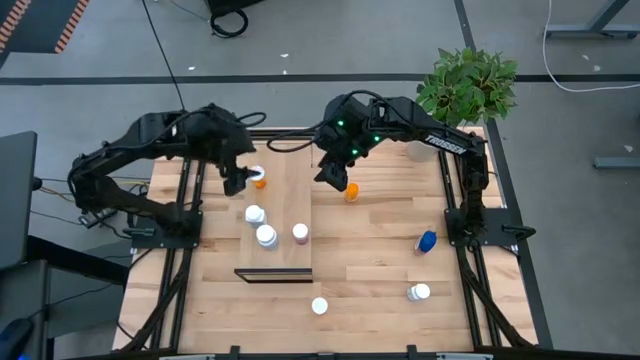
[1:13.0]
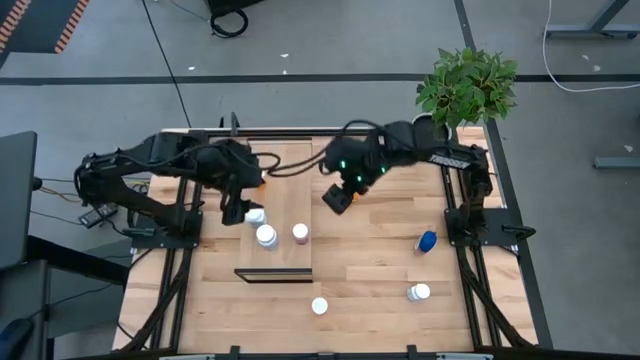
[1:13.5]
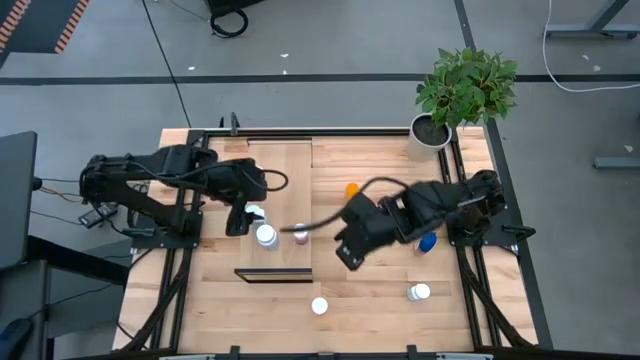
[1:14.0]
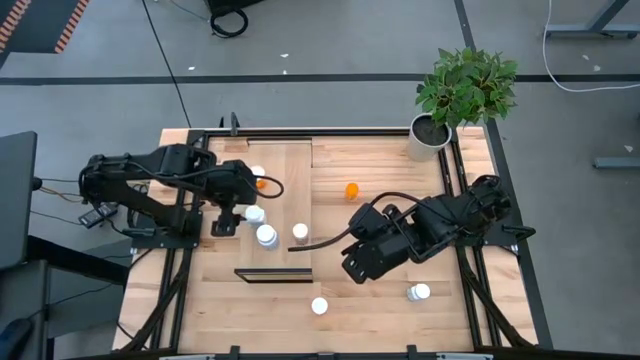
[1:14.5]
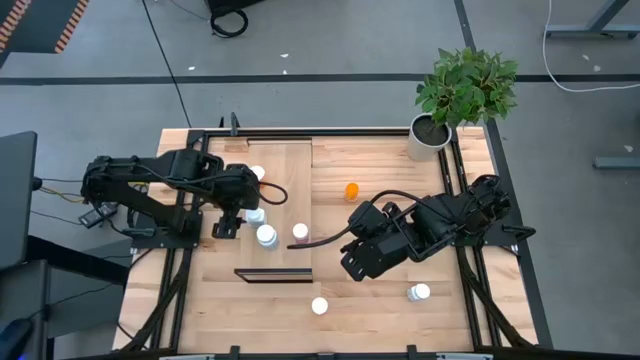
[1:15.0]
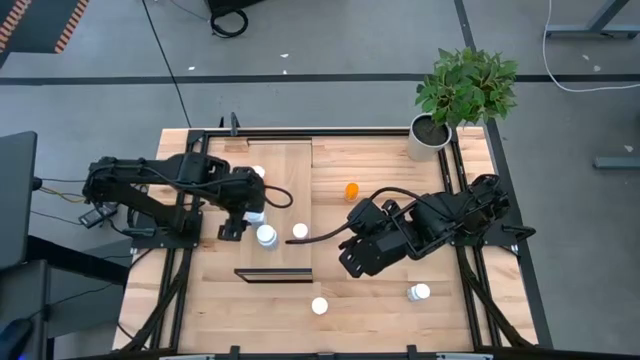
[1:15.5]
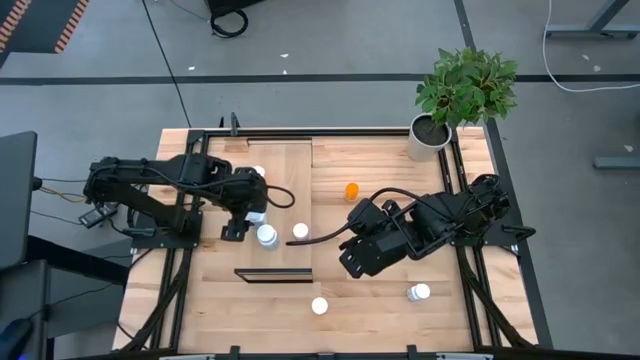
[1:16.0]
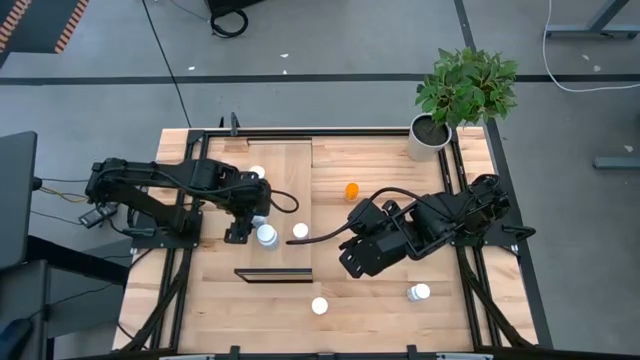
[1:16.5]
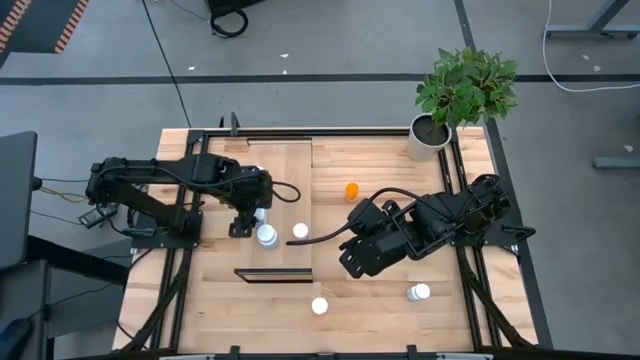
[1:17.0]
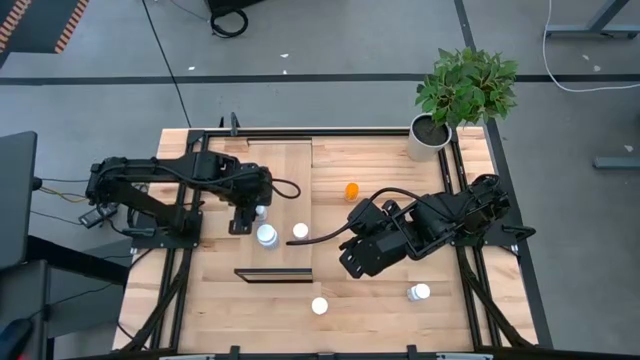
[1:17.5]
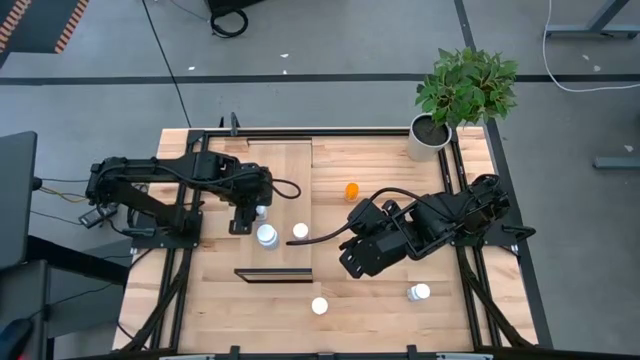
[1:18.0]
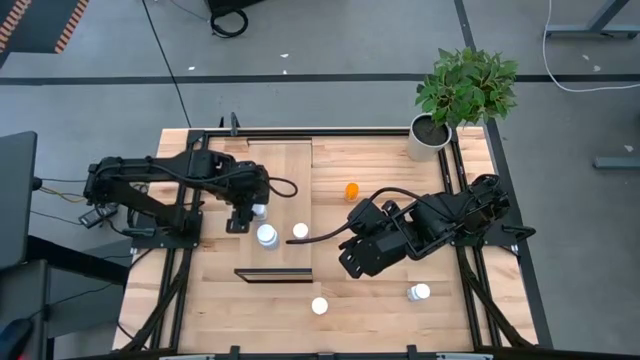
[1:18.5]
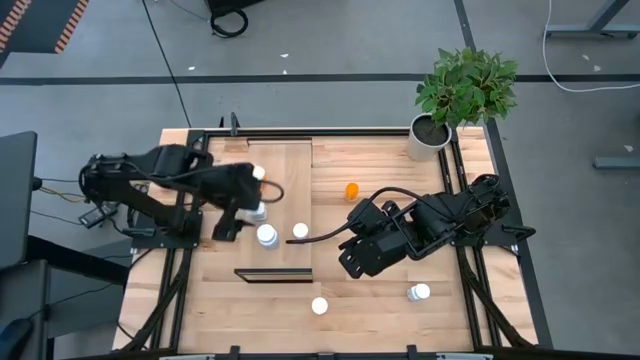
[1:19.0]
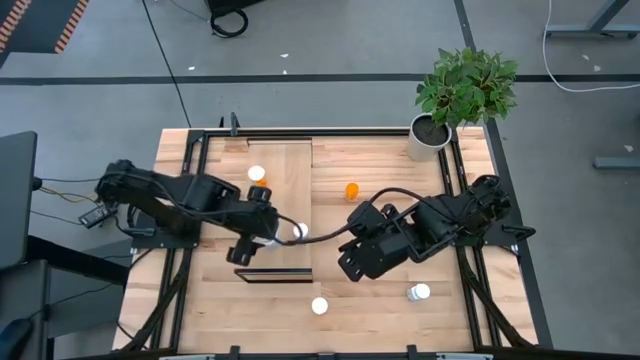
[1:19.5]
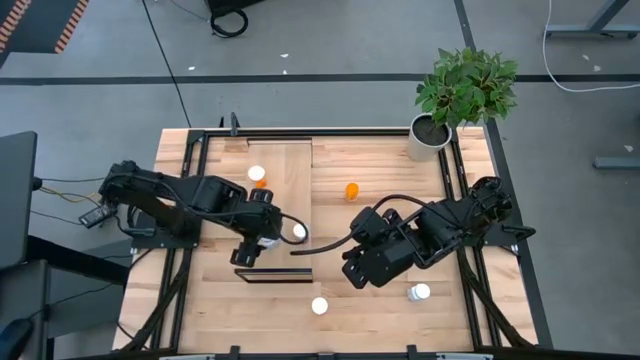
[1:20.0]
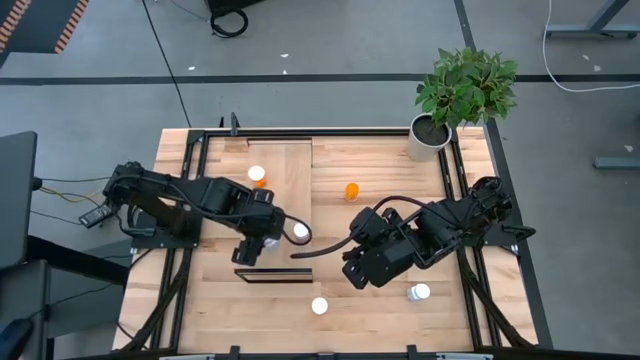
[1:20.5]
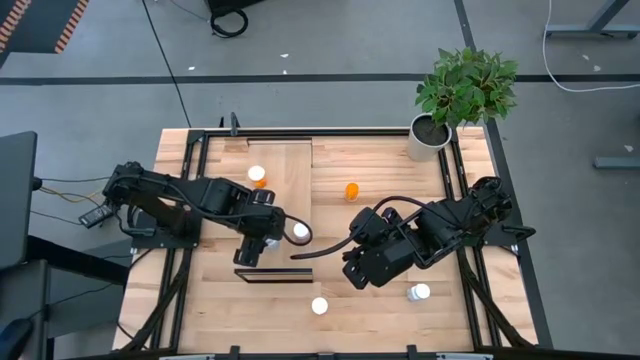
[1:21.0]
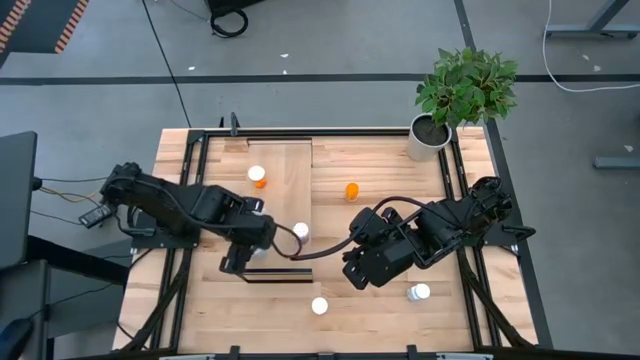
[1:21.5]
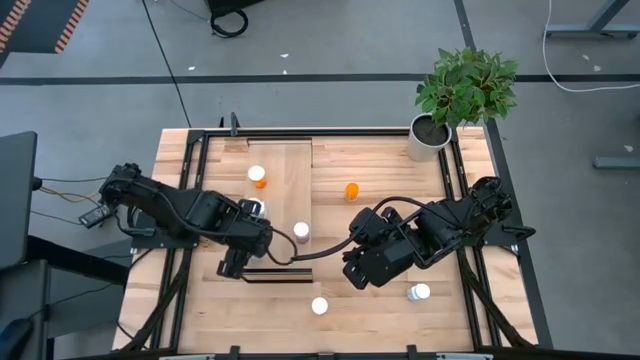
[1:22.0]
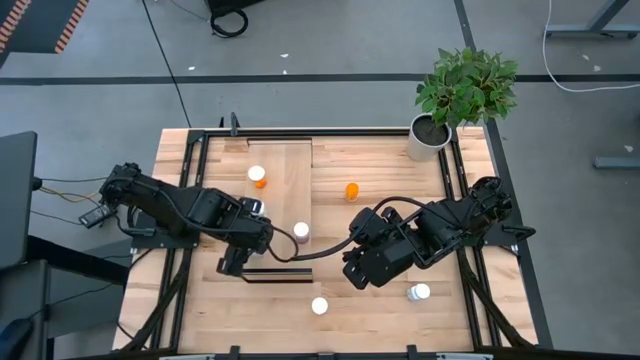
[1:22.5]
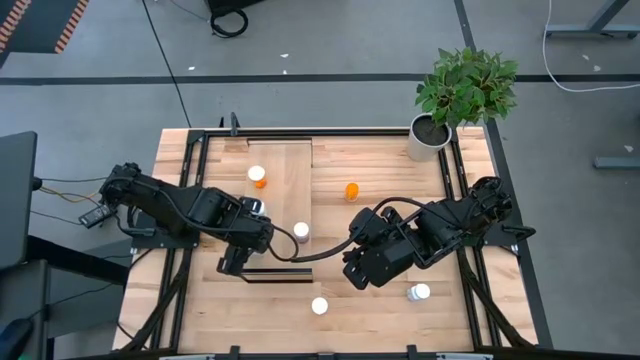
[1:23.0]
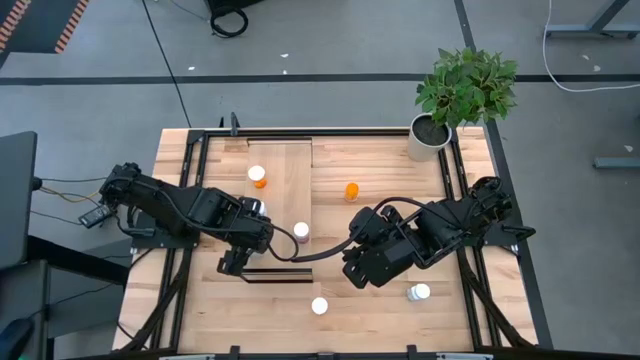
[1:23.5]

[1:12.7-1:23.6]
Task: Pick and place medicine bottles onto shelf by color
Adjust the white pill bottles on the shelf

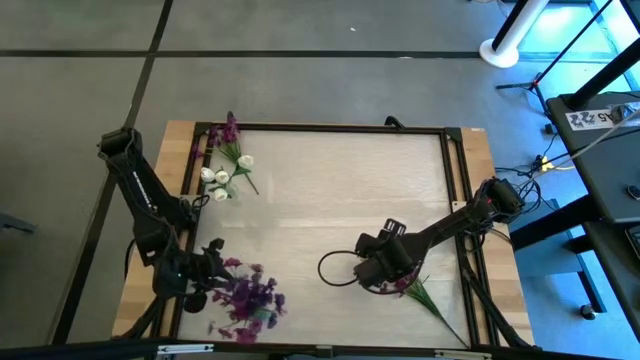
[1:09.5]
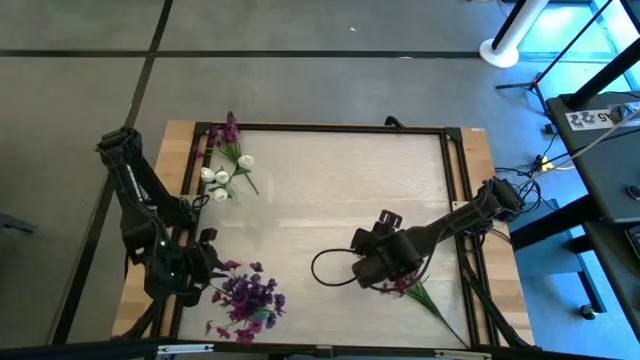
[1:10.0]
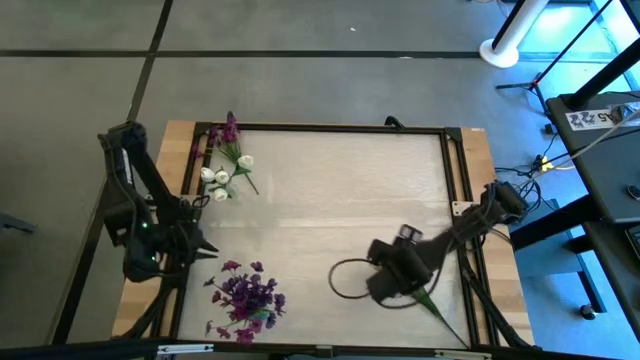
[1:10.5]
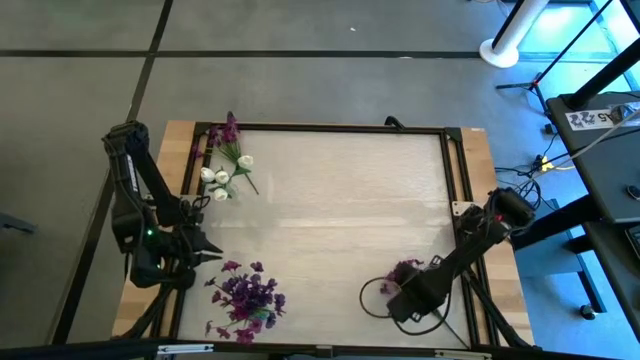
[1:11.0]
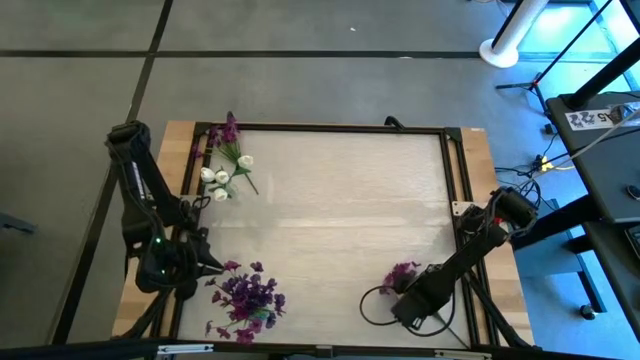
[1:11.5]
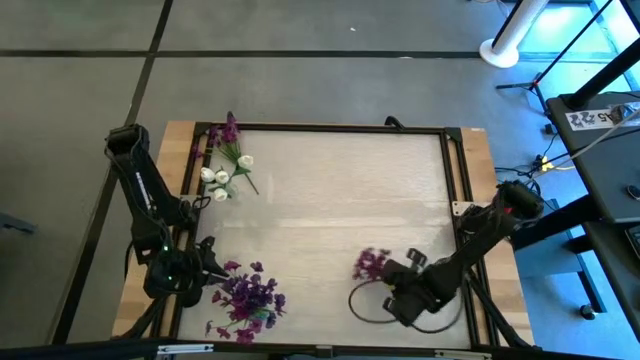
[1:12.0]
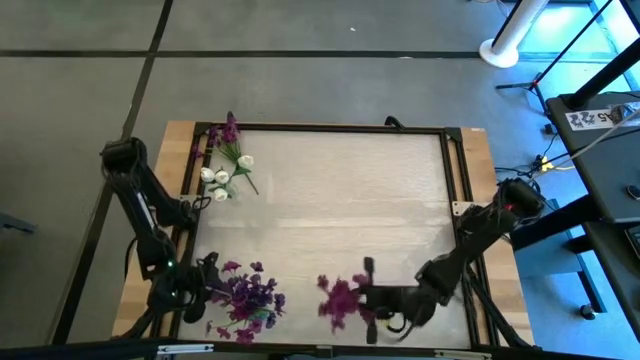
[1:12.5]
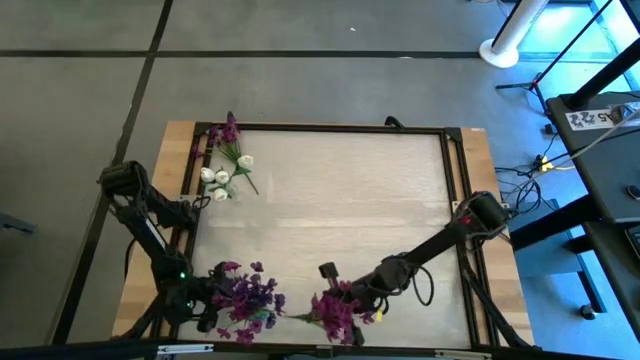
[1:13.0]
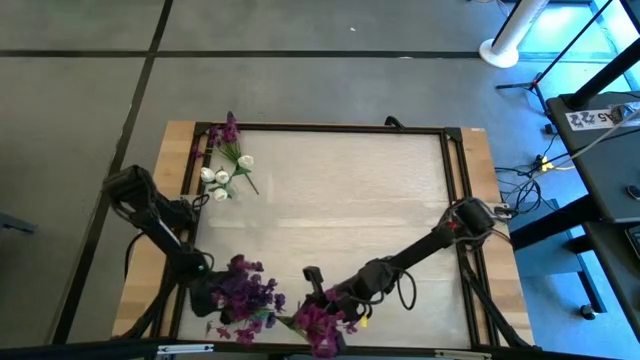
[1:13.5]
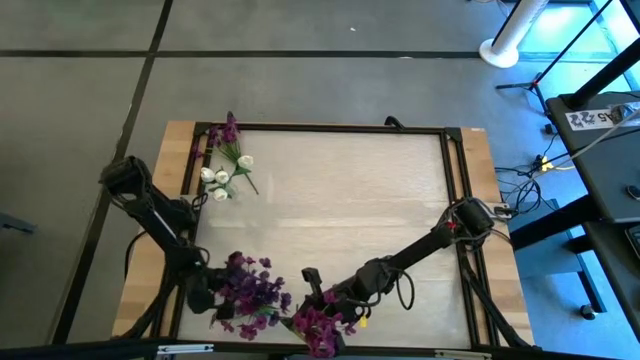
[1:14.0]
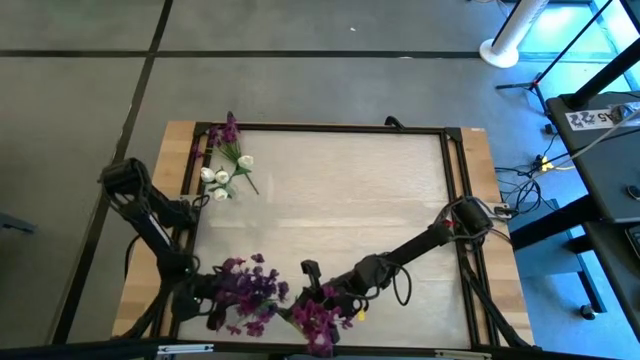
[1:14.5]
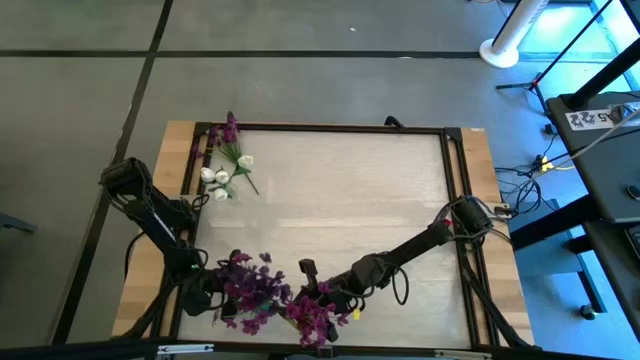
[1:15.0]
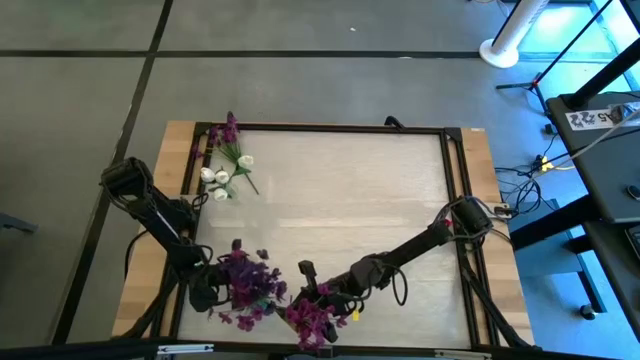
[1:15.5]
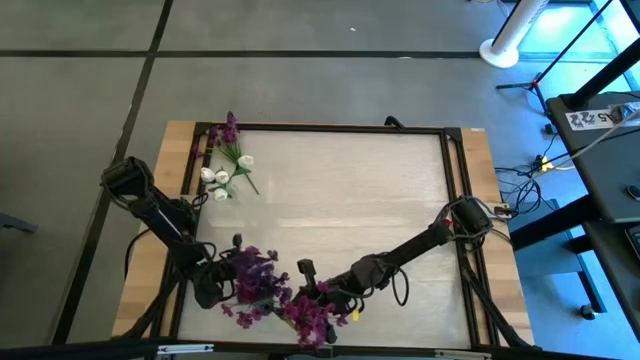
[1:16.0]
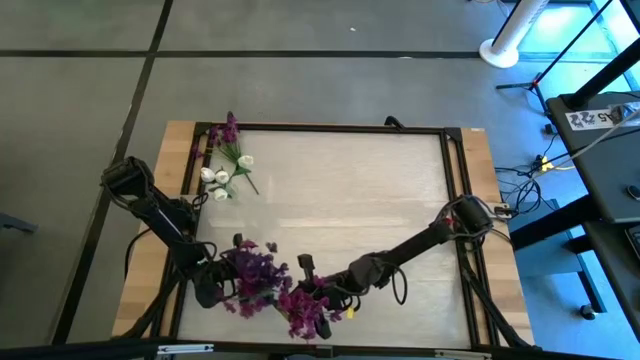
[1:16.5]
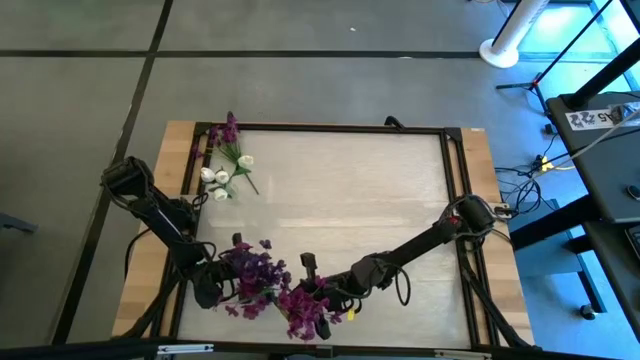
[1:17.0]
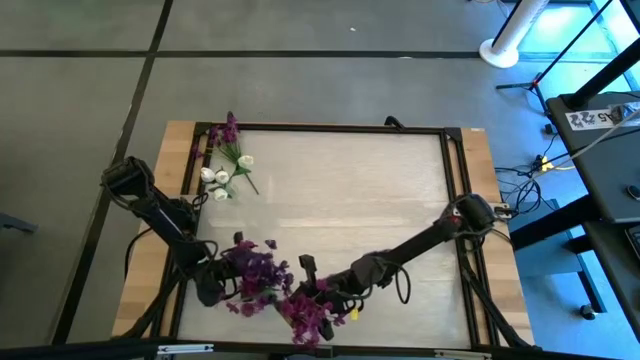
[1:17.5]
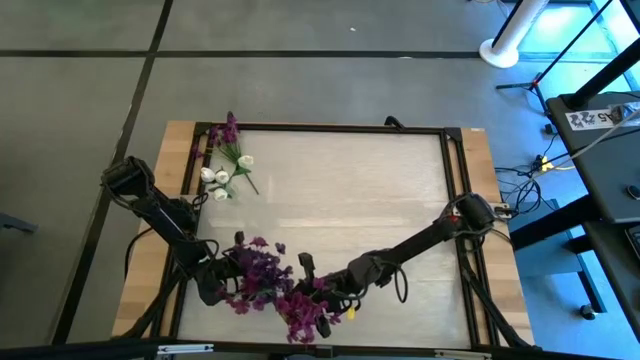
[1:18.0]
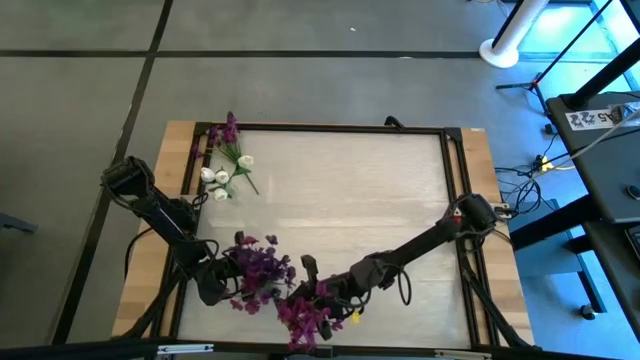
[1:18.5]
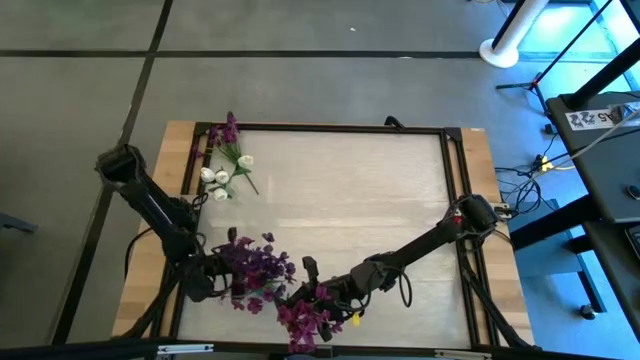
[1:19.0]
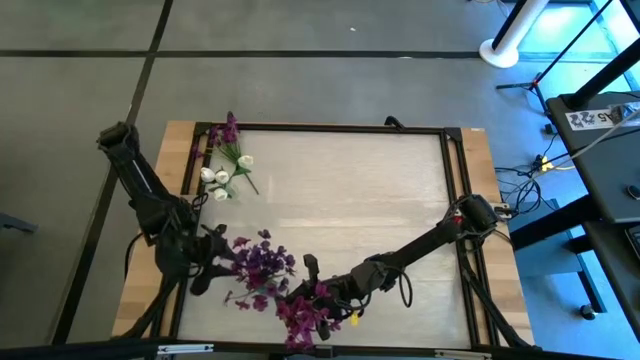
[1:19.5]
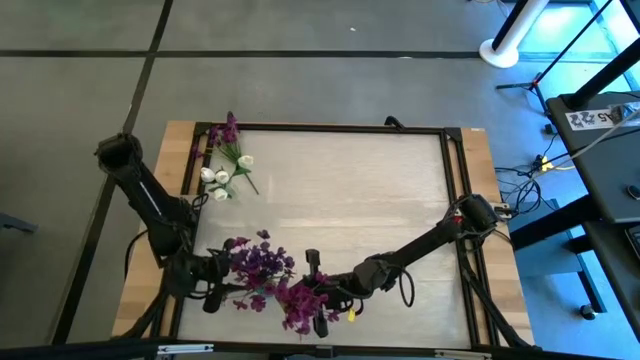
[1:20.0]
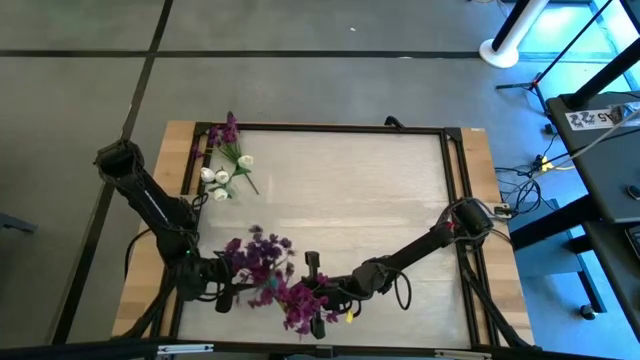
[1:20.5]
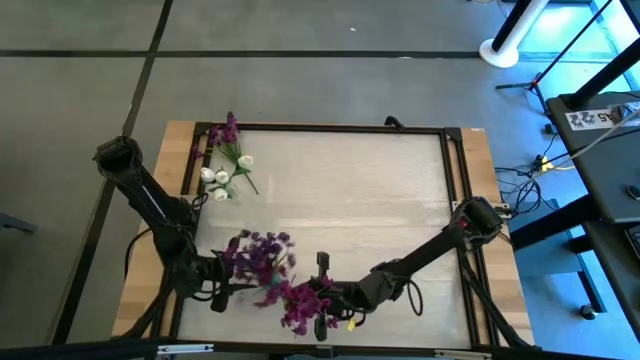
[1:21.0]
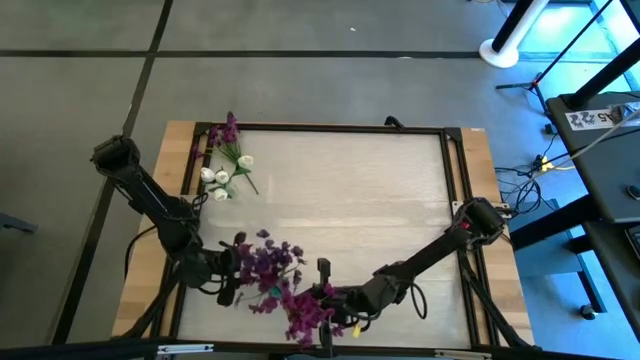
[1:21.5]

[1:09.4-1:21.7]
Task: Sort flowers into vase by color
Put the violet flower into the transparent blue vase
